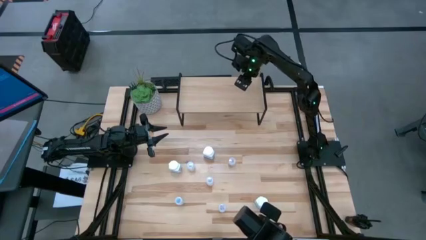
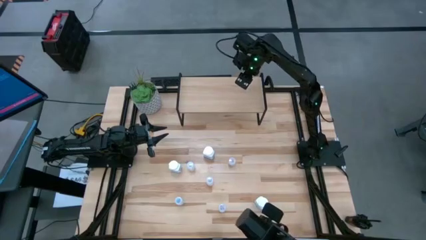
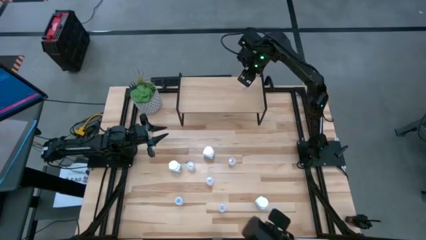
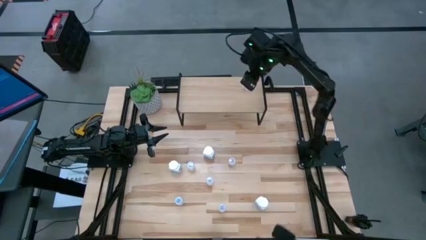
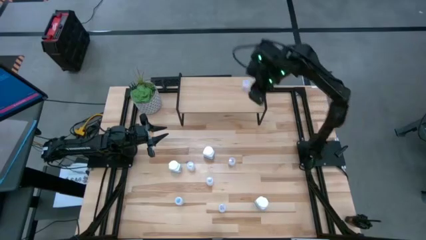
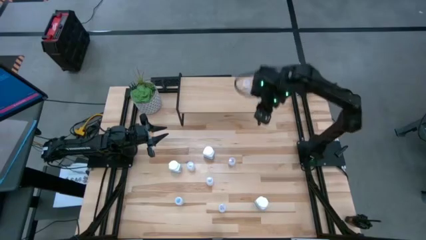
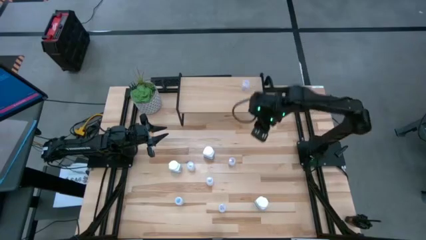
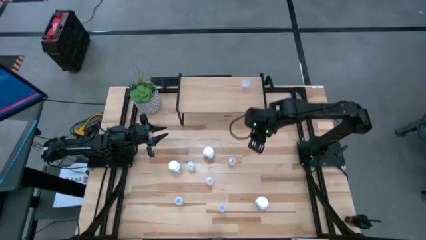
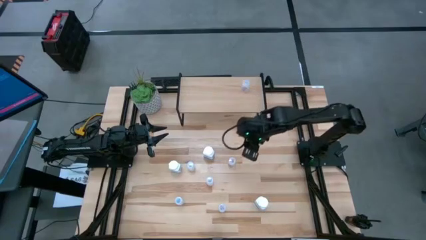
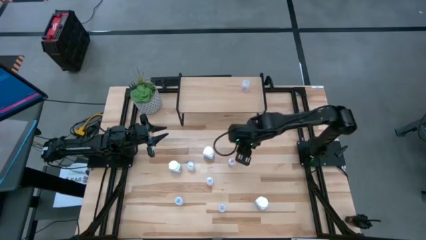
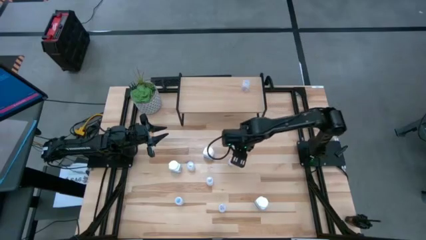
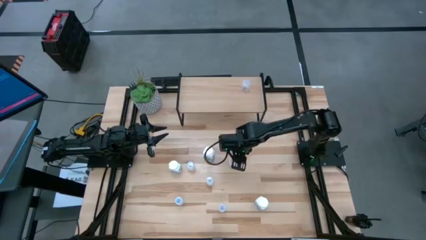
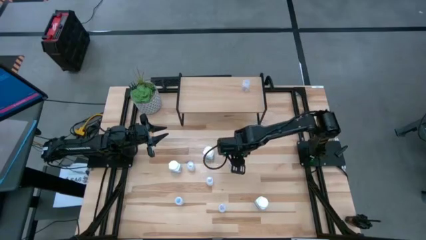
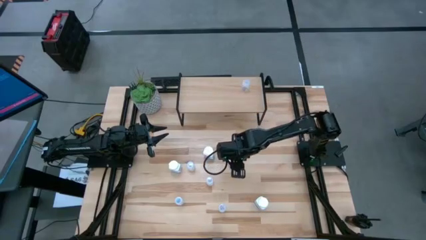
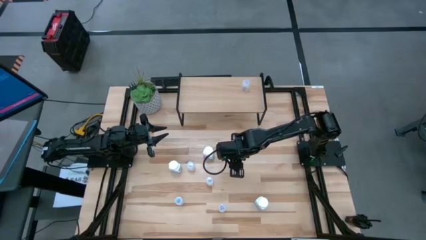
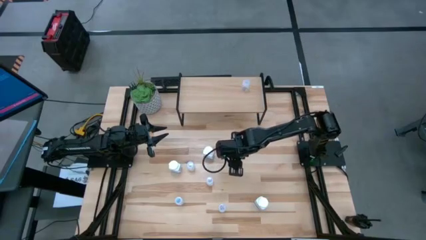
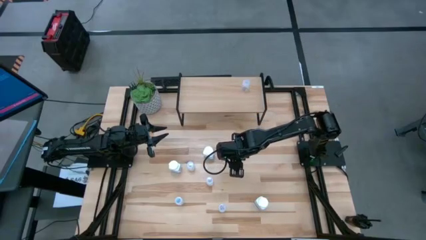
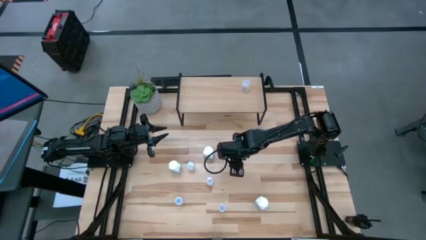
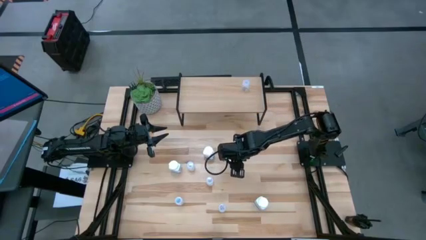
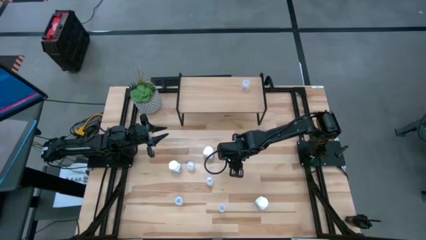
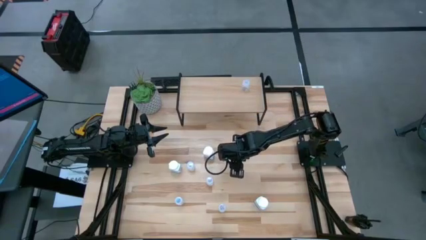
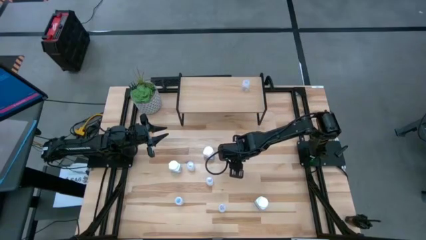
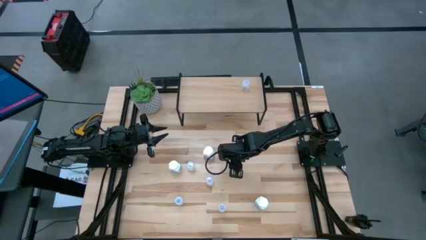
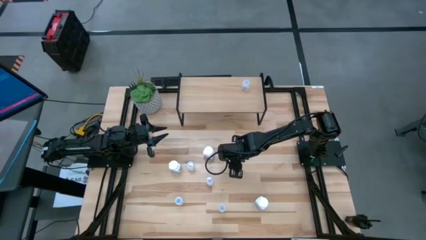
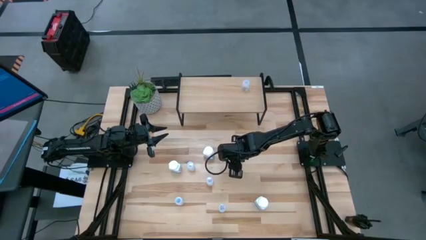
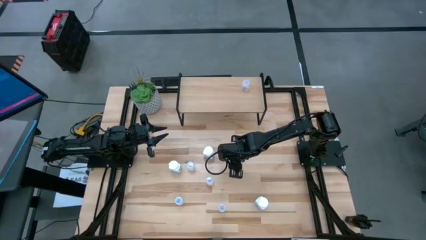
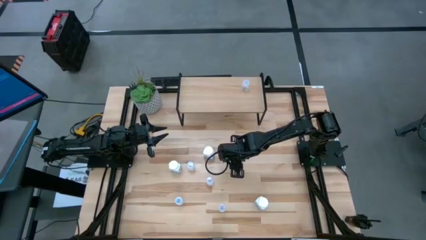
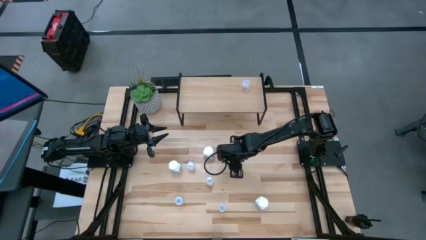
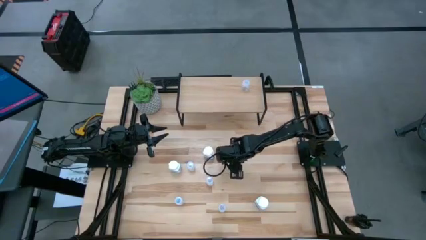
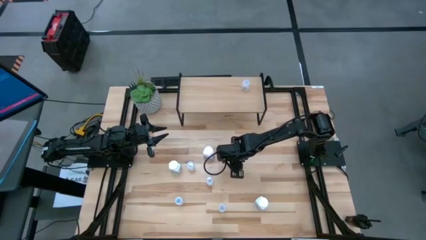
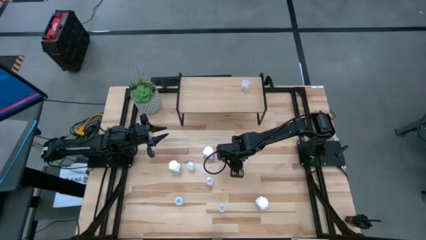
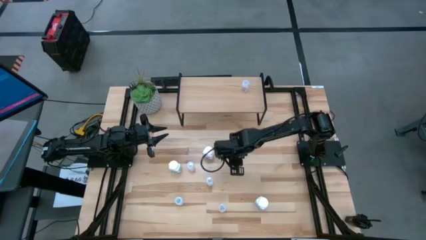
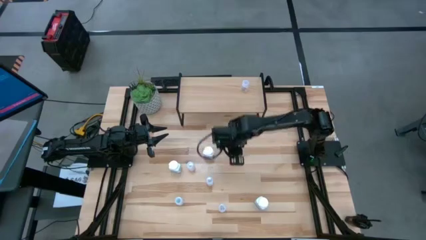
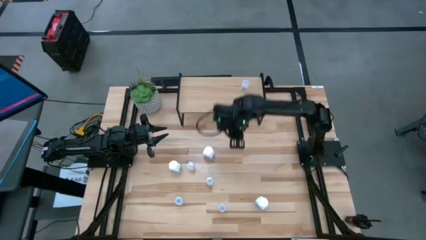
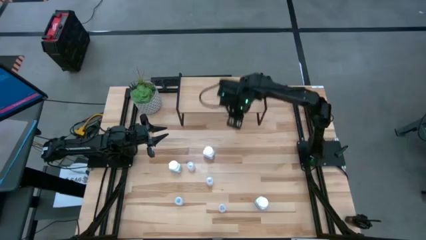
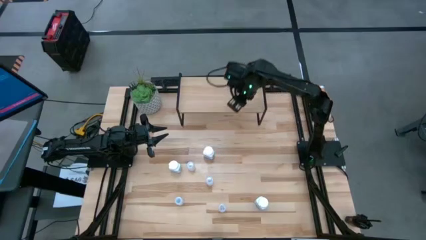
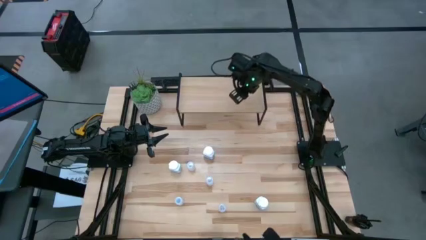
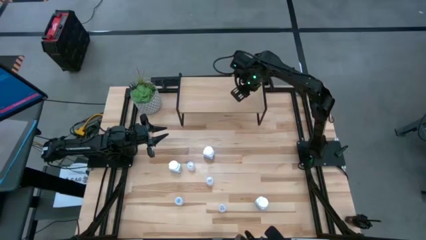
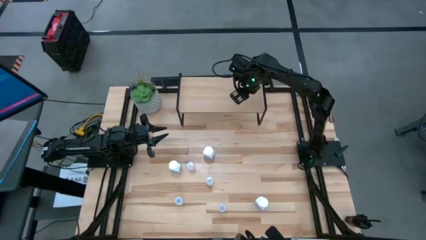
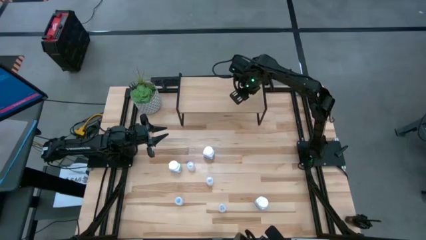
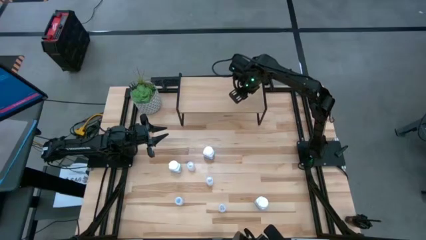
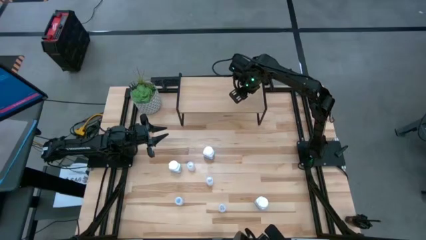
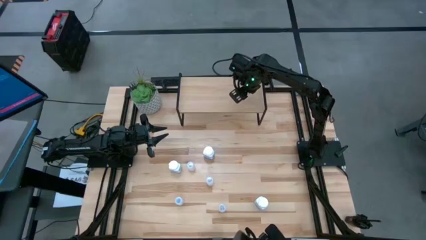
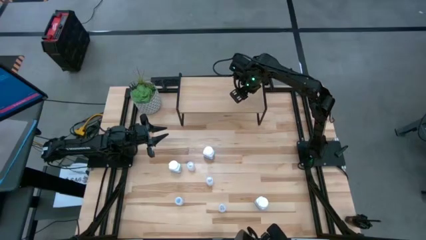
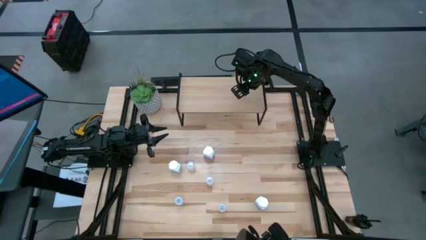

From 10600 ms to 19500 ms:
Task: Pick and place medicine bottles onto shelf by color
Put the top transparent pill bottle aligned with the other transparent pill bottle on the shelf

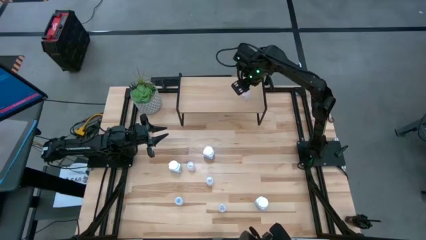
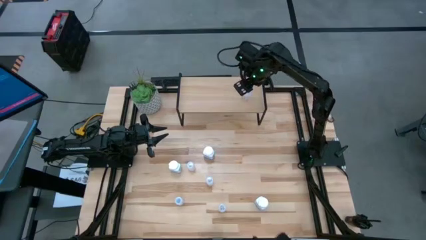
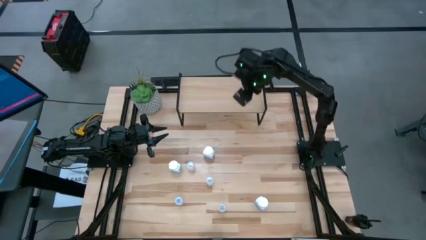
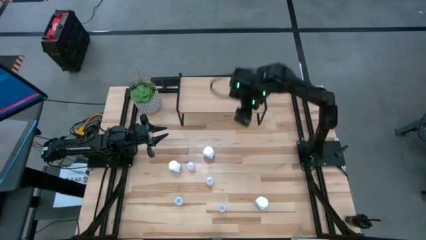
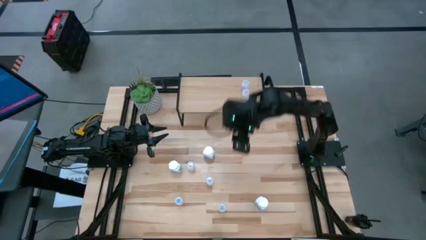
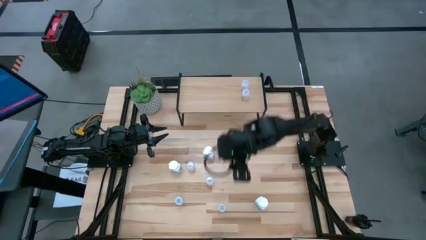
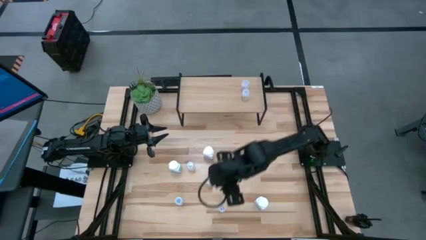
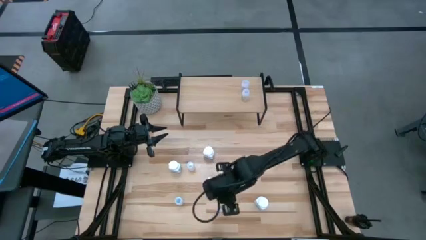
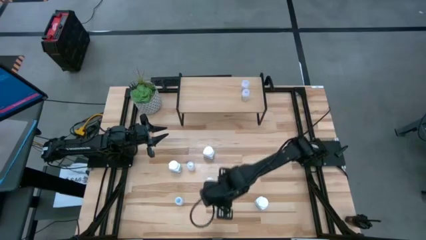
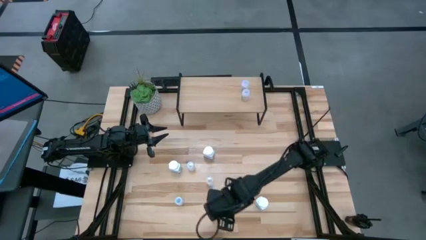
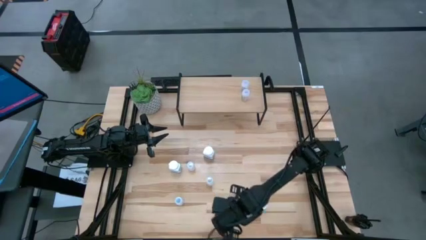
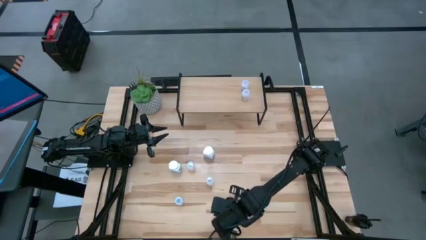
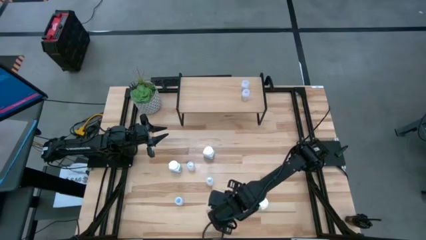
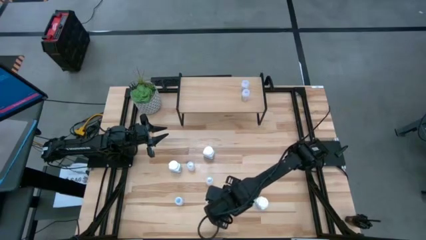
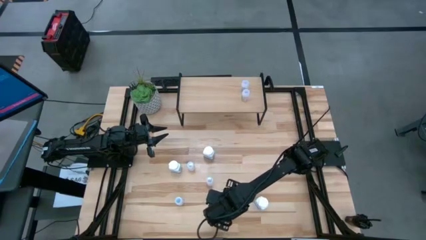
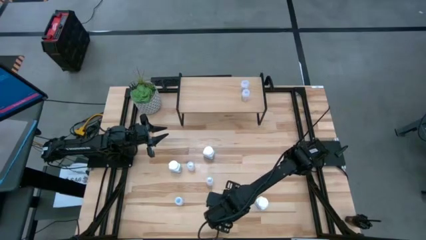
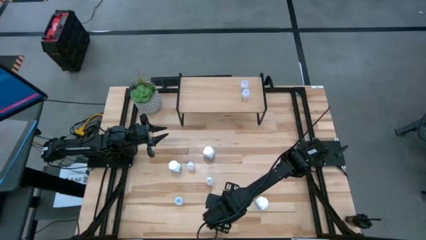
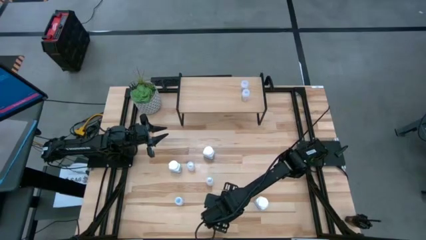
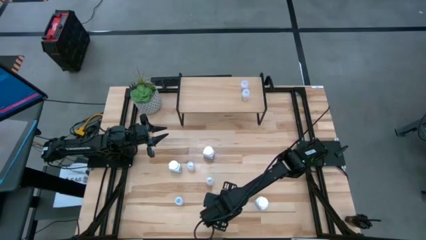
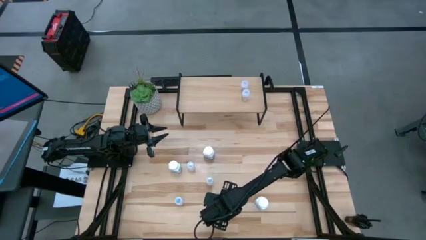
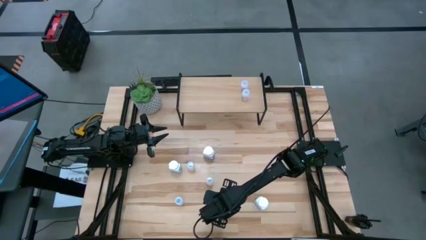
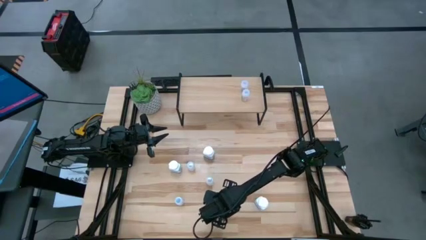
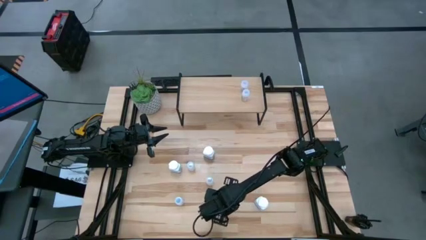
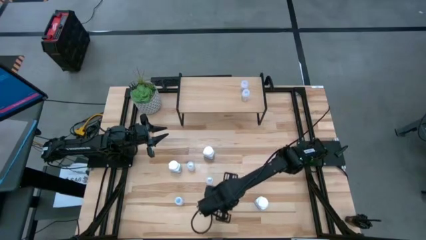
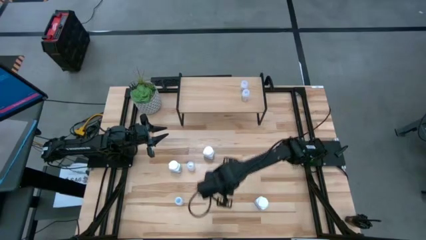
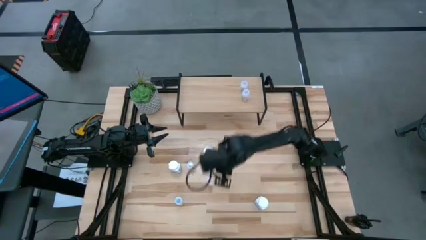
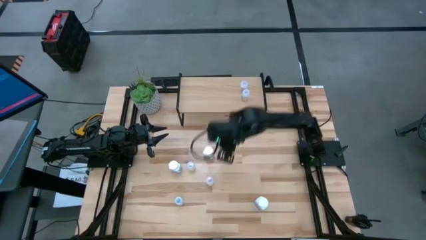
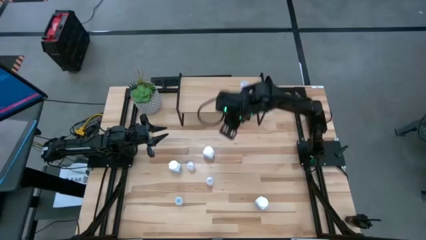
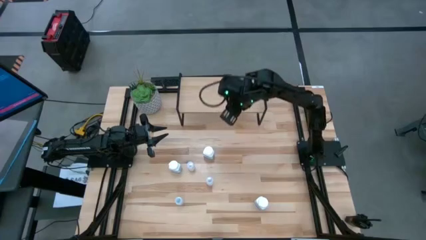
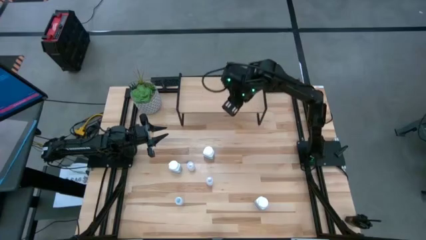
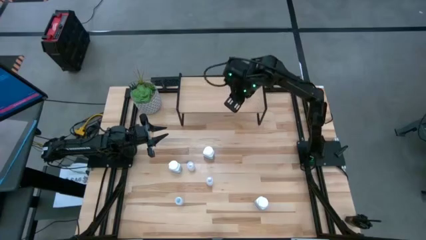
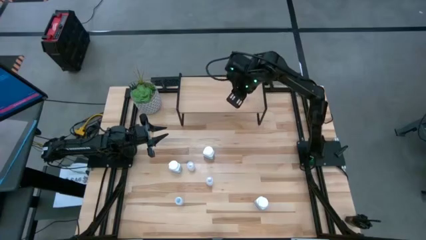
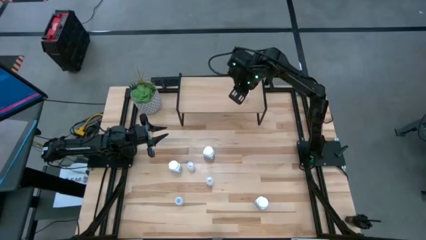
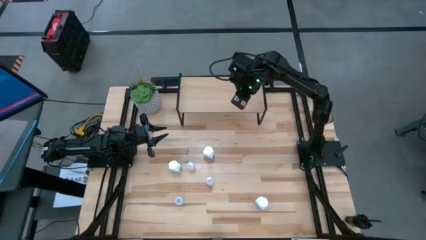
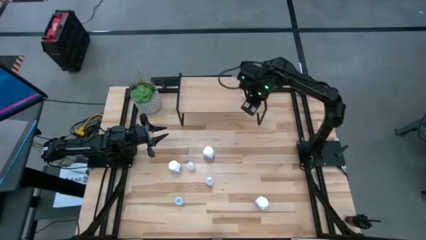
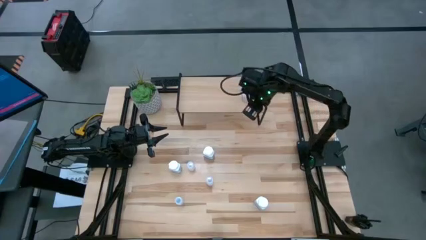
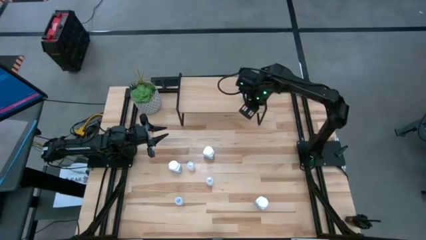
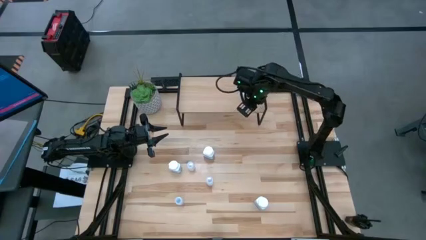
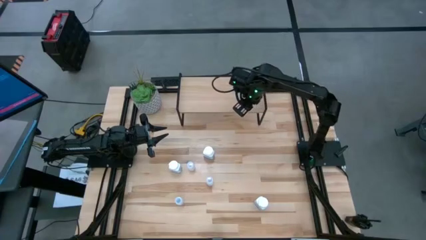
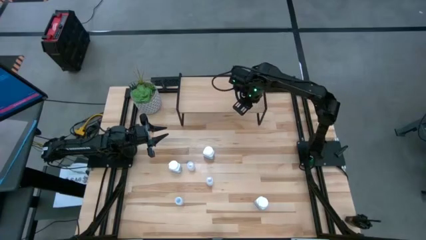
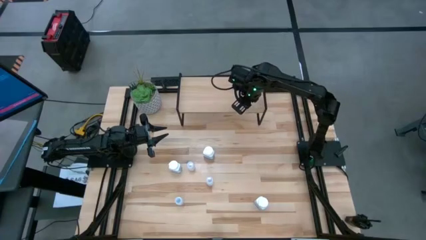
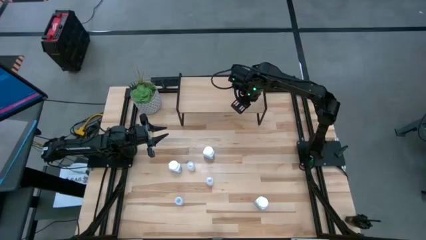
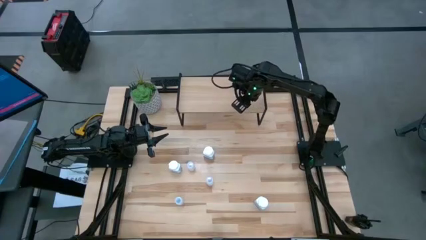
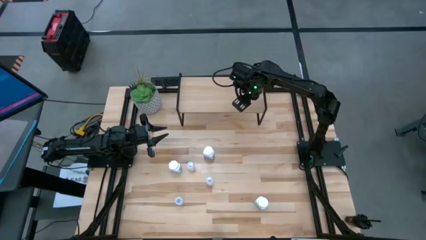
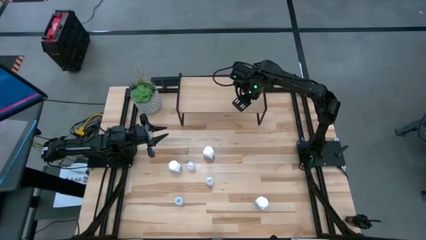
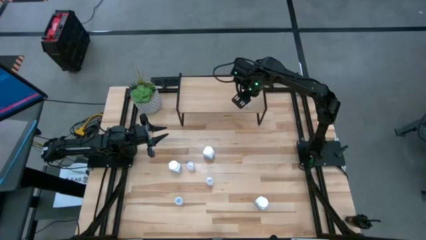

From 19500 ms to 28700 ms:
Put the transparent pill bottle aligned with the other transparent pill bottle on the shelf
